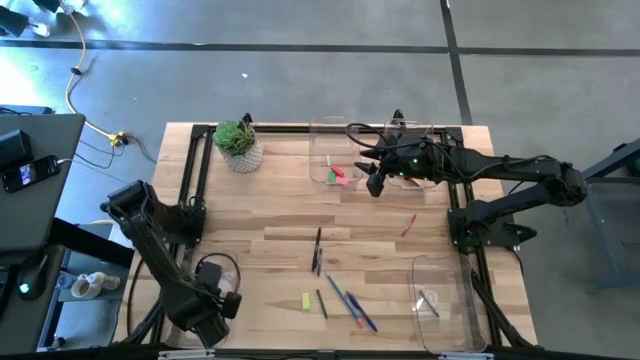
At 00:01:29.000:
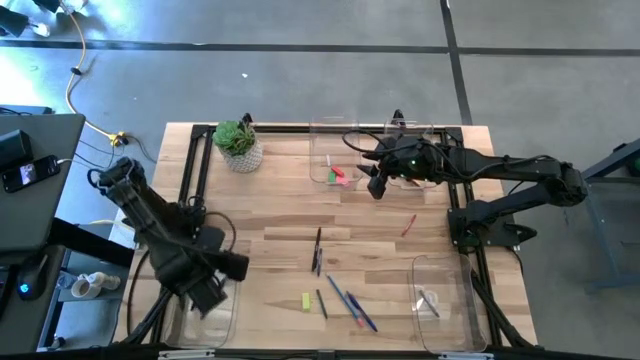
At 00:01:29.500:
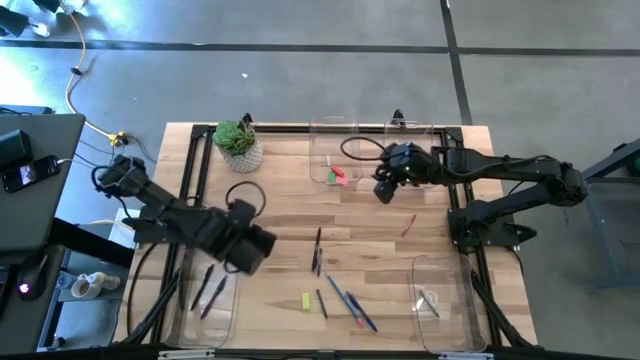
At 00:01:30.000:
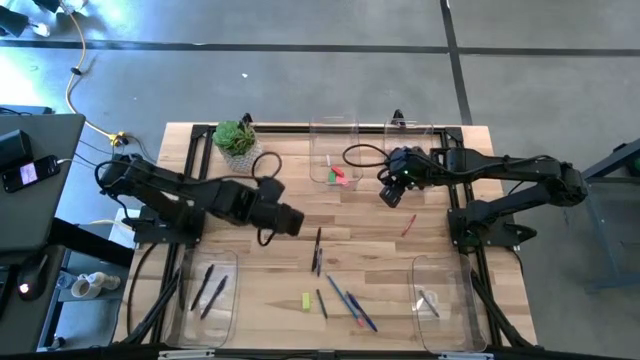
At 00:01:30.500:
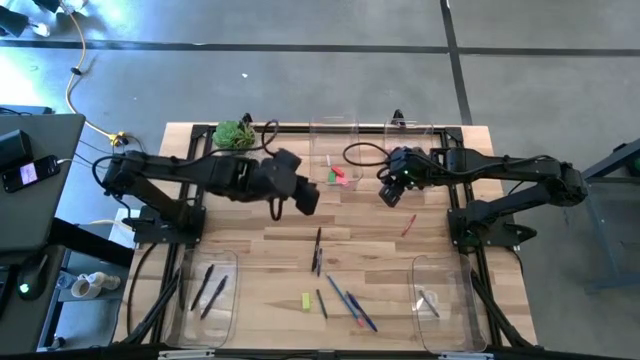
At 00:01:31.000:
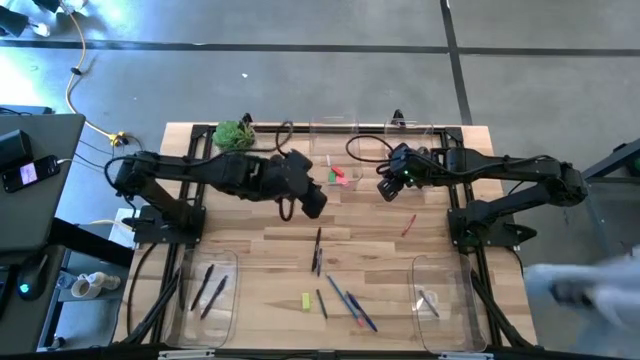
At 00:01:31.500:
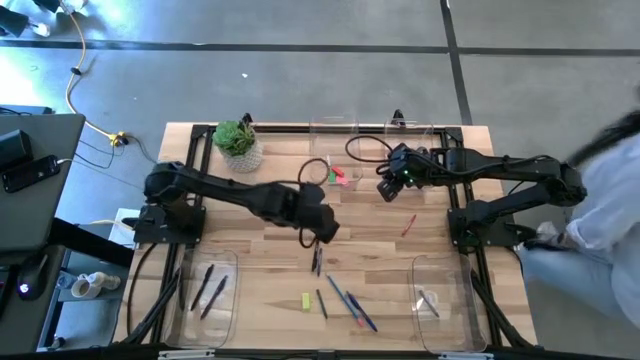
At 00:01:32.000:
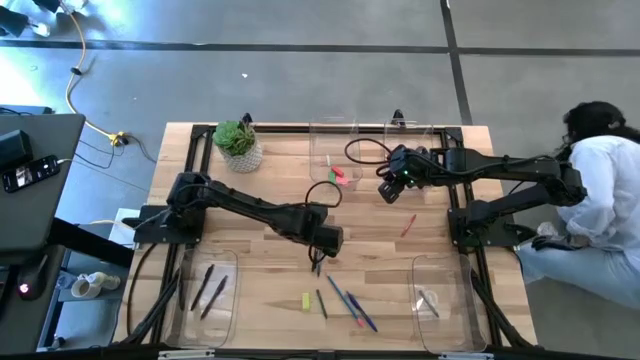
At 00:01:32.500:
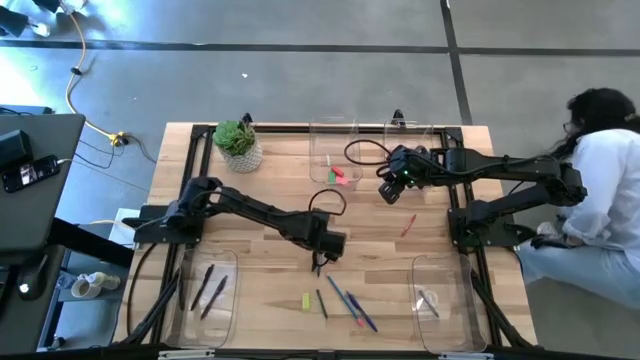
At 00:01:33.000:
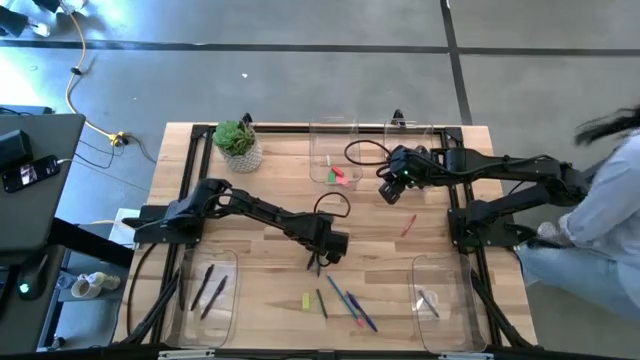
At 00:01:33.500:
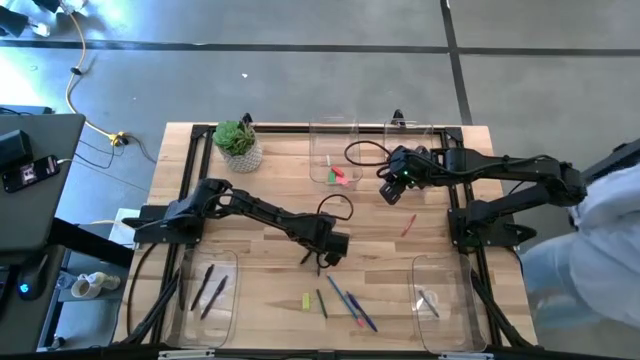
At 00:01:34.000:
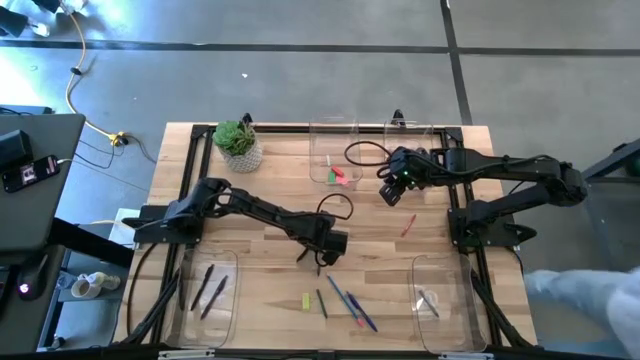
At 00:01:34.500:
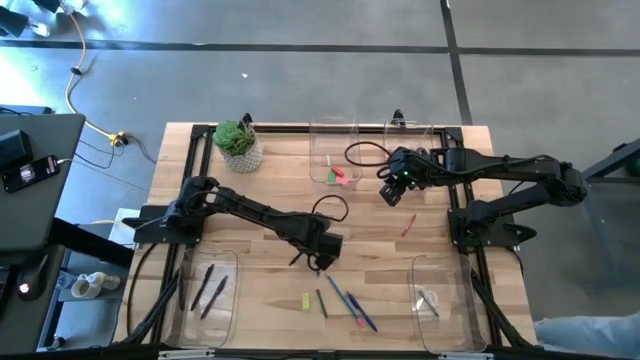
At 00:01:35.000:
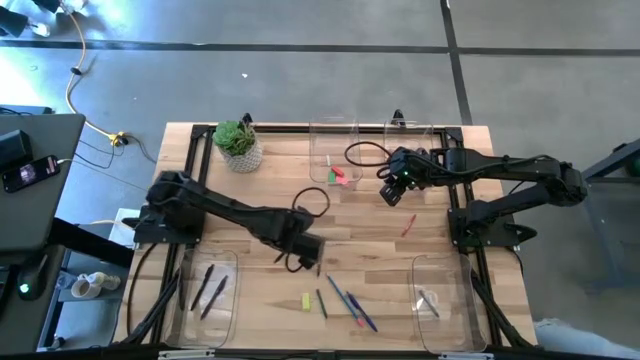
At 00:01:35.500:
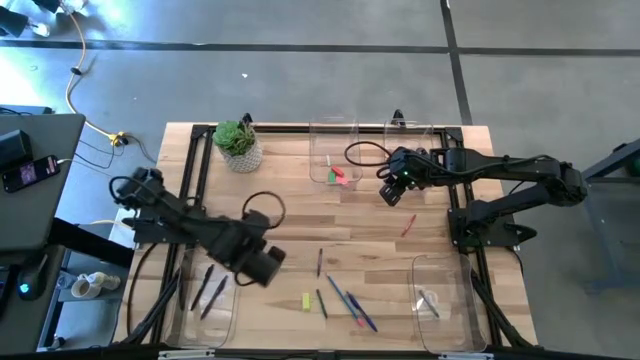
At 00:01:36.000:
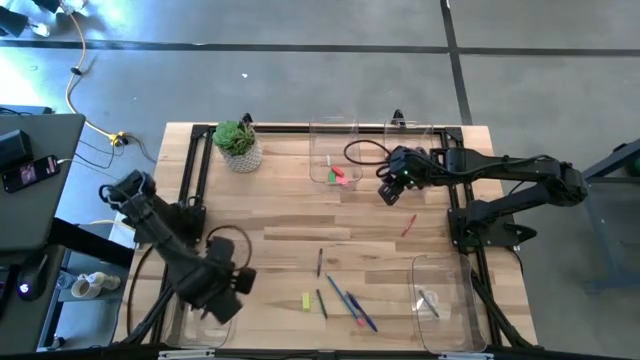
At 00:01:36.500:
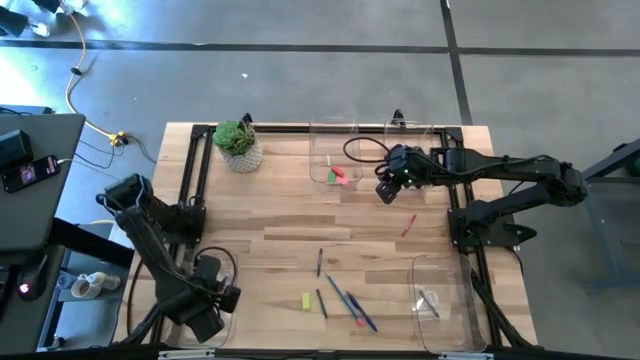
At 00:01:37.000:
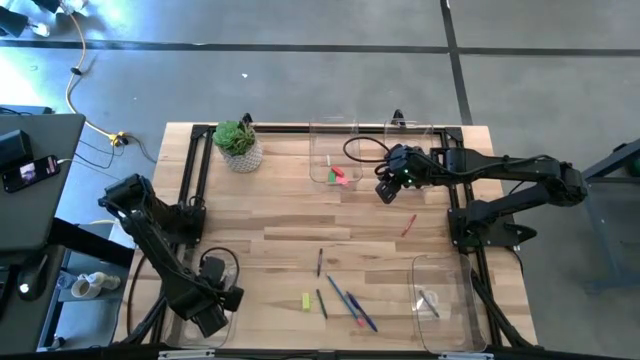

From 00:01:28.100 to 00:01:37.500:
Task: Sort crayons/erasers/pens/pencils in bins
Put the black pen into the bottom left transparent bin

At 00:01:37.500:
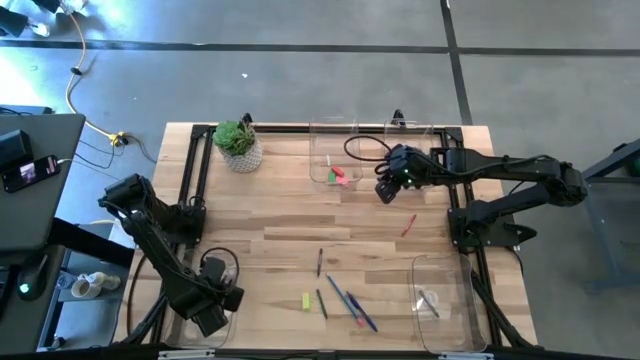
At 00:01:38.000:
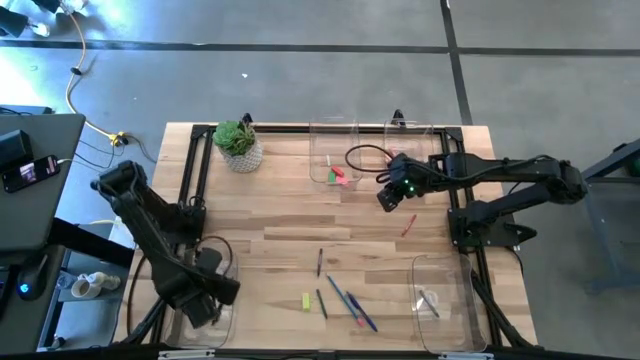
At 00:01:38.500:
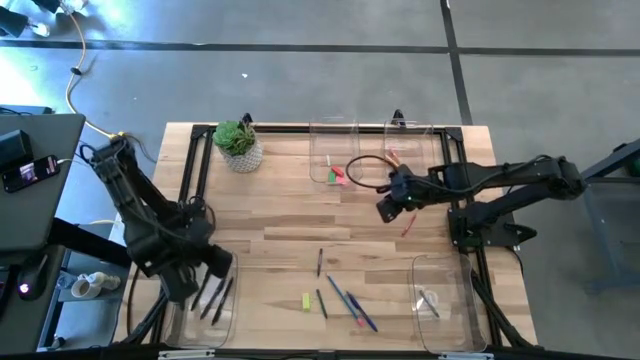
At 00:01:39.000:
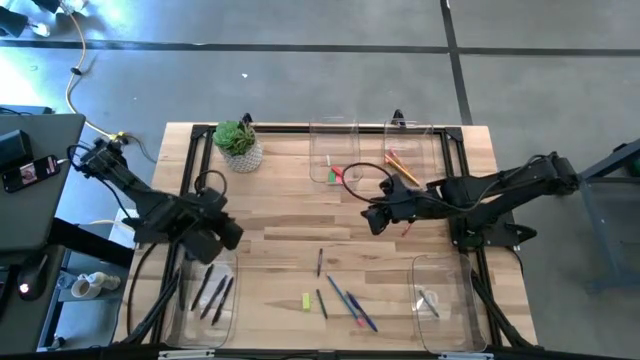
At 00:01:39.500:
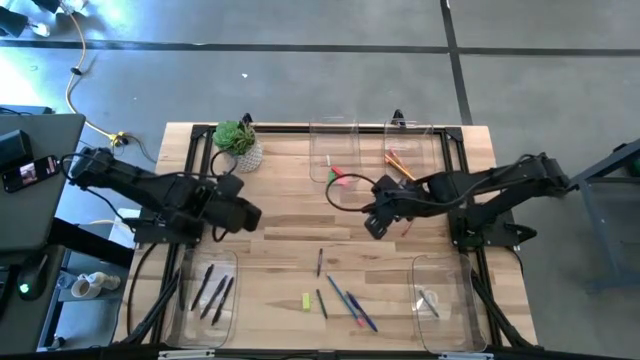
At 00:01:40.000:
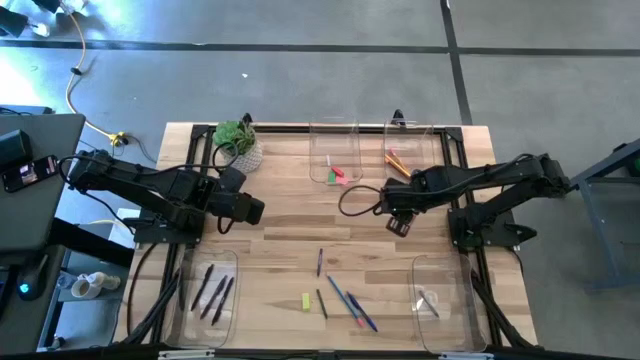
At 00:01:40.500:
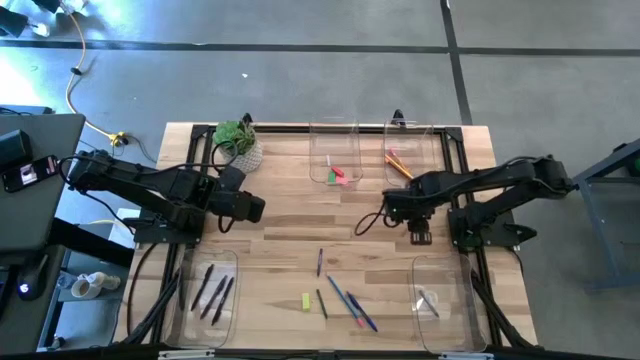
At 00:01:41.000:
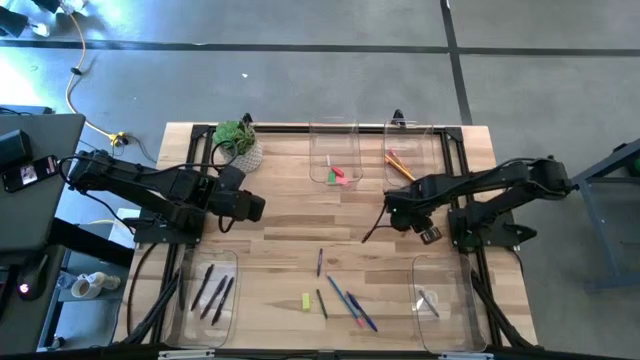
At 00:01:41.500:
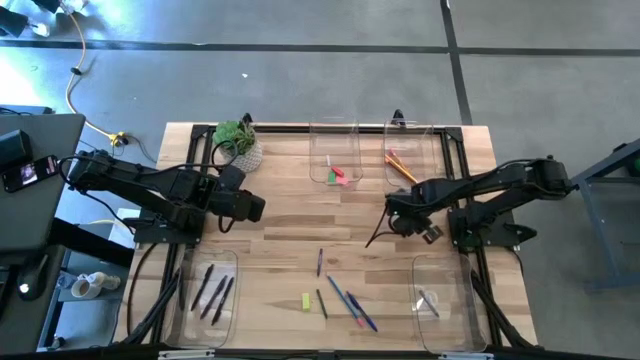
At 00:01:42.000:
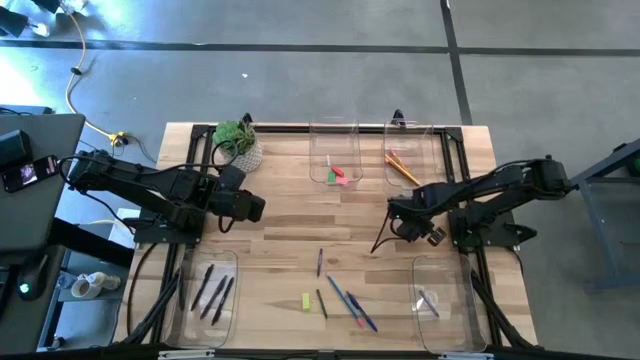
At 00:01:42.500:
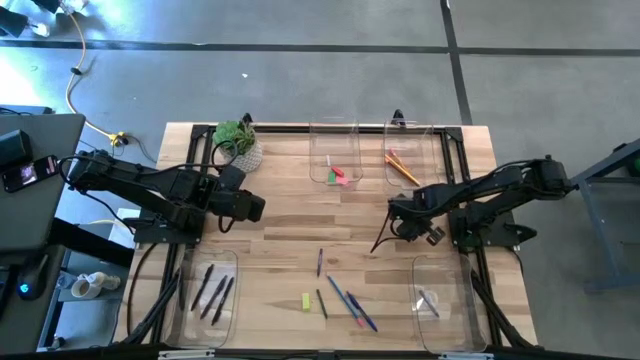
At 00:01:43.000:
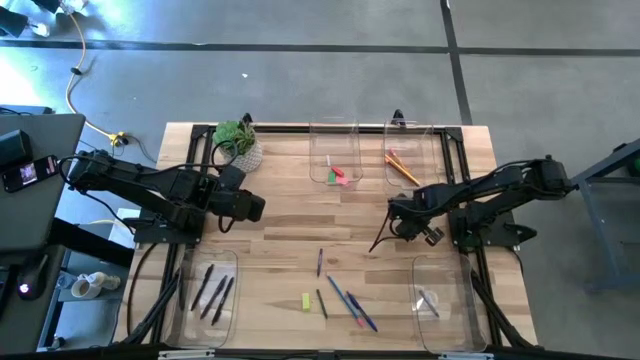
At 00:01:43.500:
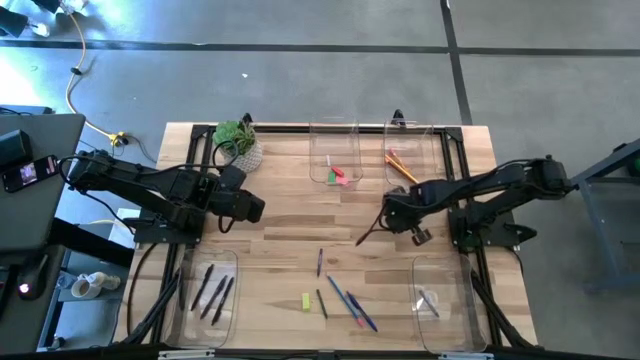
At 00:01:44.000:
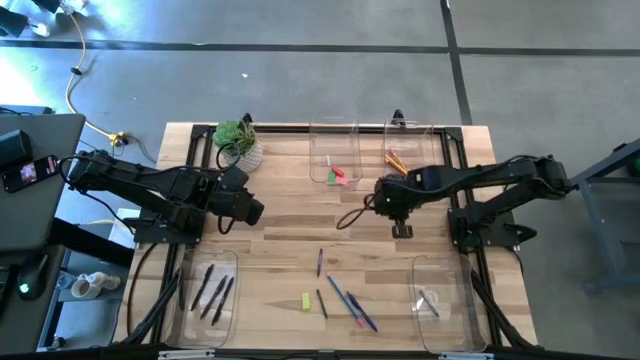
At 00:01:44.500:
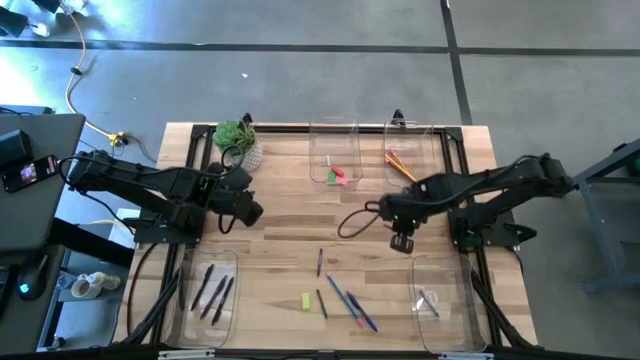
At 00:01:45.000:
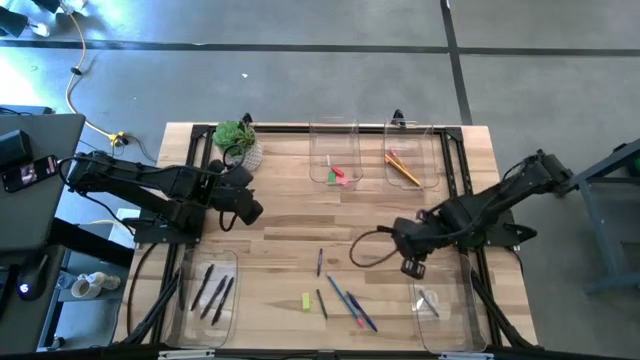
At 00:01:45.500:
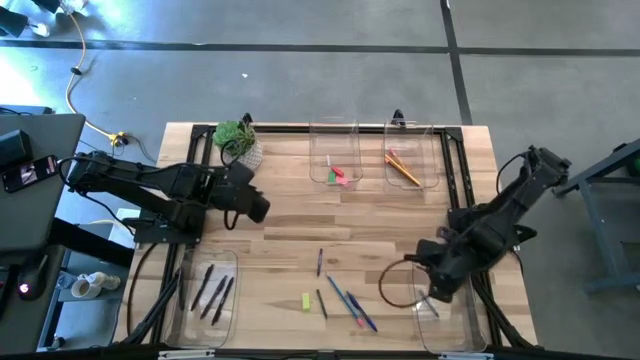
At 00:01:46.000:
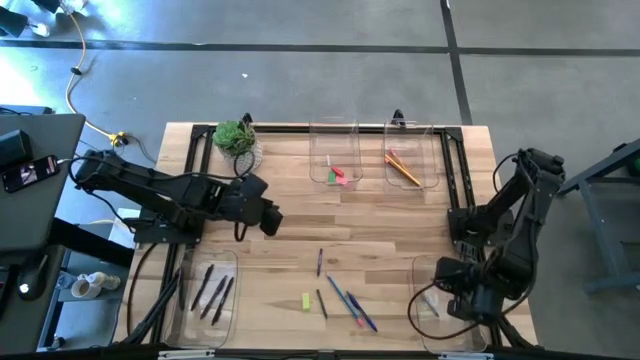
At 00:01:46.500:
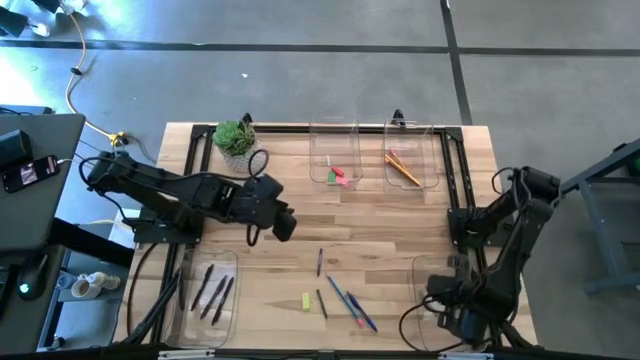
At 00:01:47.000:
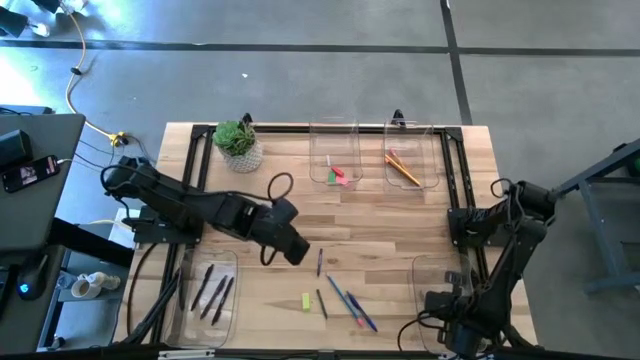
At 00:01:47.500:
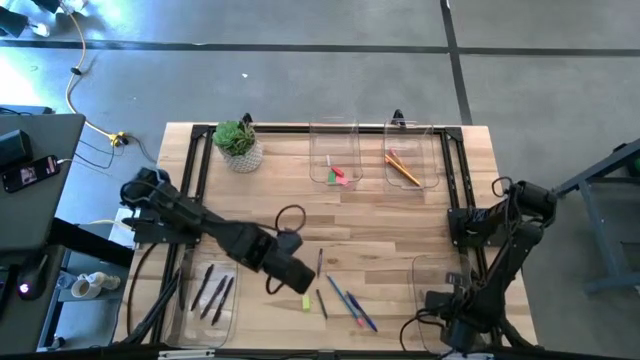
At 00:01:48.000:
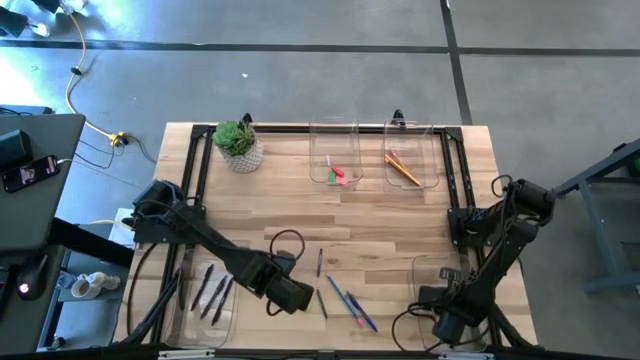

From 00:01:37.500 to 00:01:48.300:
Put the red crayon into the bottom right transparent bin
